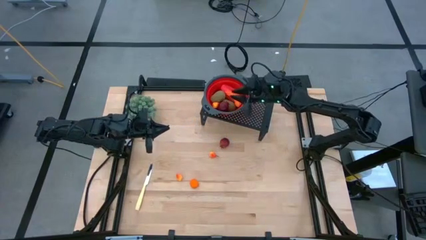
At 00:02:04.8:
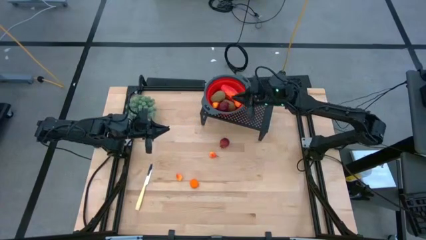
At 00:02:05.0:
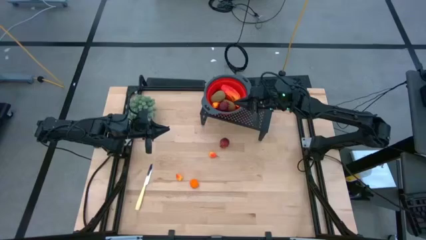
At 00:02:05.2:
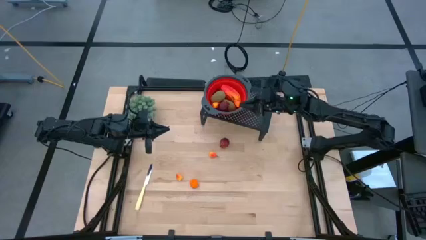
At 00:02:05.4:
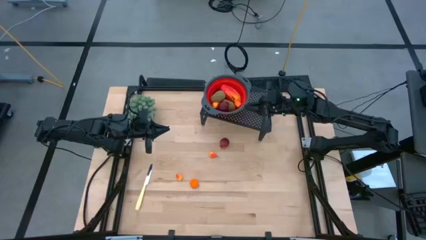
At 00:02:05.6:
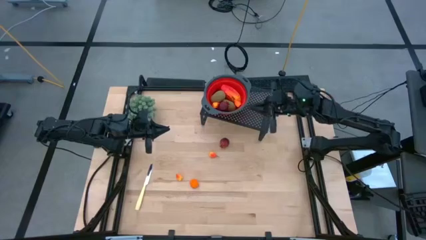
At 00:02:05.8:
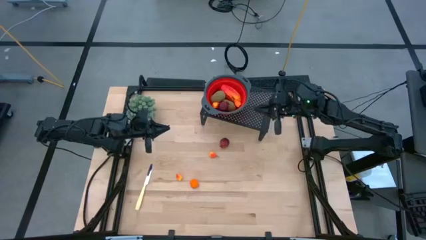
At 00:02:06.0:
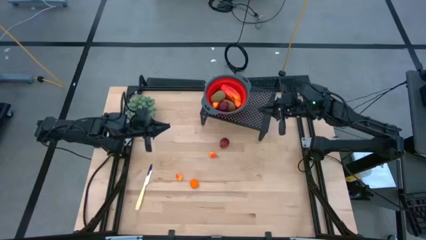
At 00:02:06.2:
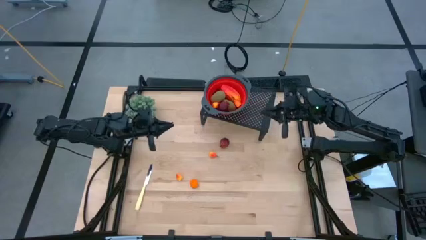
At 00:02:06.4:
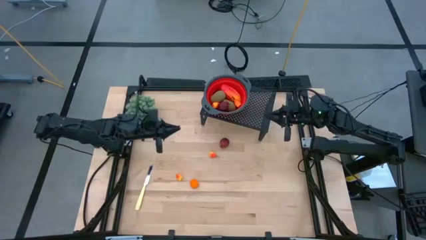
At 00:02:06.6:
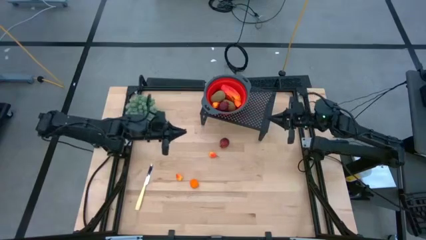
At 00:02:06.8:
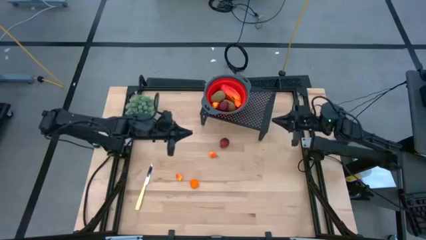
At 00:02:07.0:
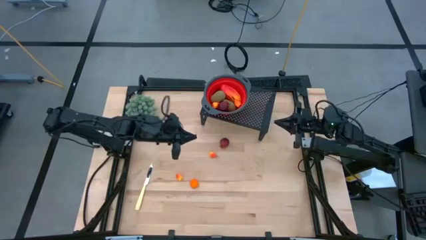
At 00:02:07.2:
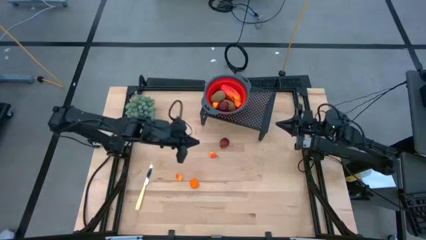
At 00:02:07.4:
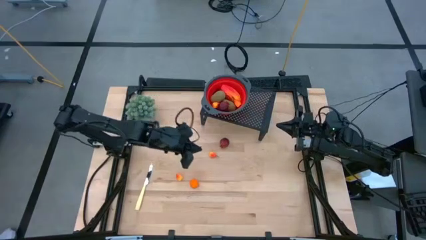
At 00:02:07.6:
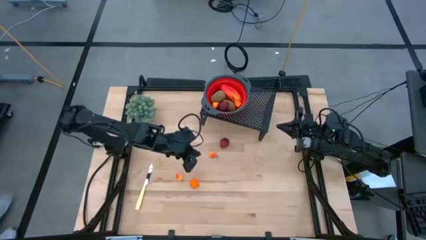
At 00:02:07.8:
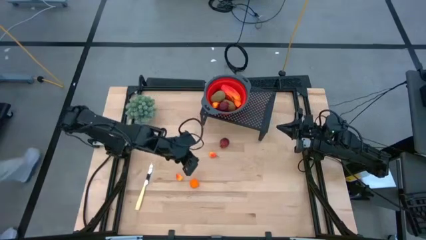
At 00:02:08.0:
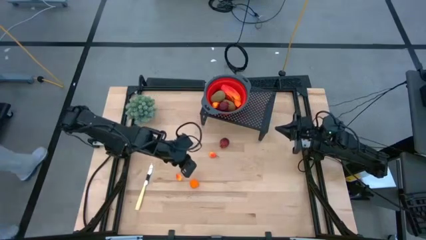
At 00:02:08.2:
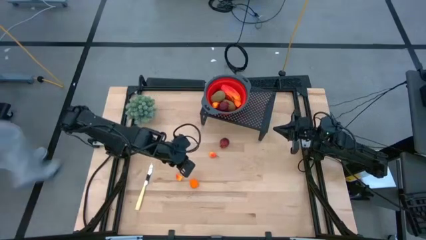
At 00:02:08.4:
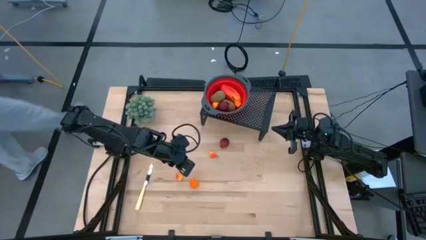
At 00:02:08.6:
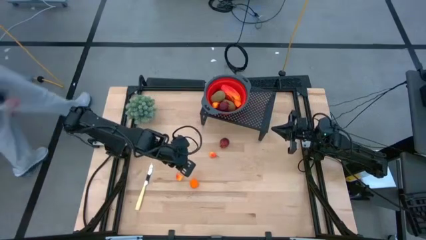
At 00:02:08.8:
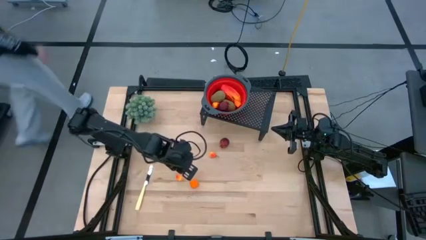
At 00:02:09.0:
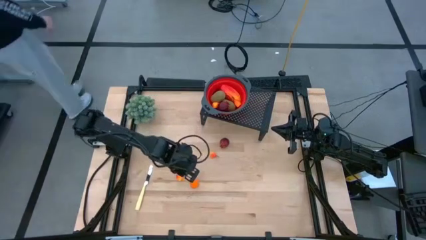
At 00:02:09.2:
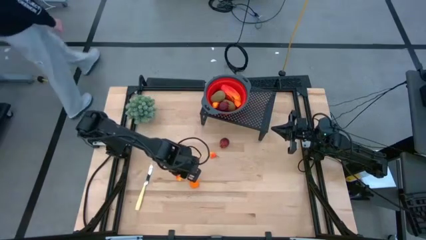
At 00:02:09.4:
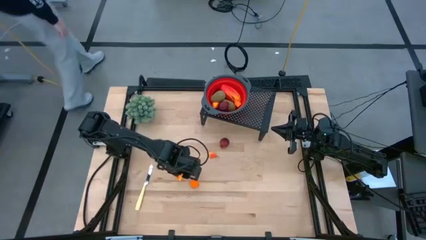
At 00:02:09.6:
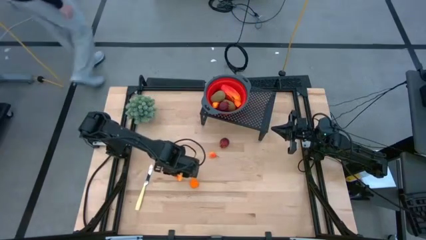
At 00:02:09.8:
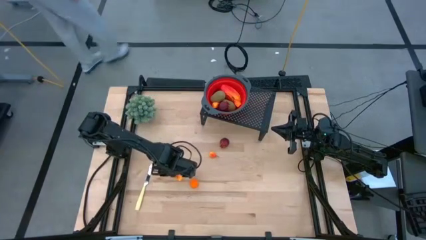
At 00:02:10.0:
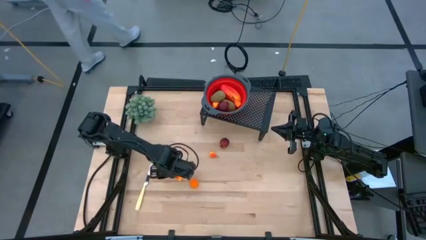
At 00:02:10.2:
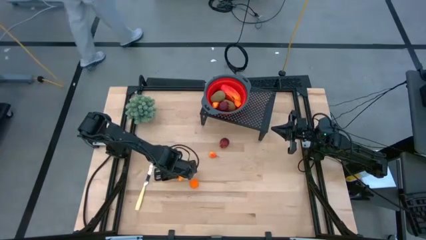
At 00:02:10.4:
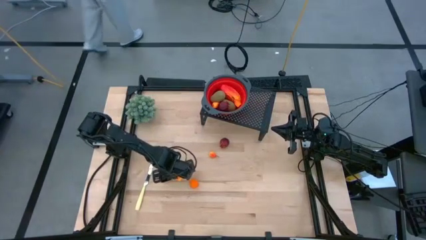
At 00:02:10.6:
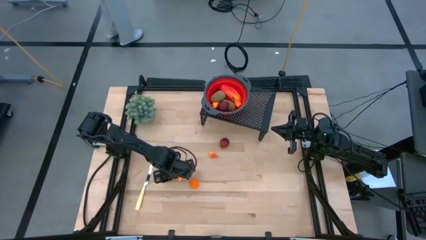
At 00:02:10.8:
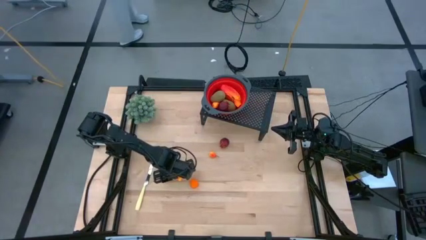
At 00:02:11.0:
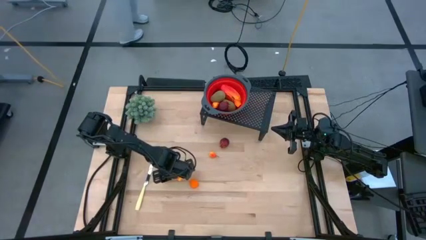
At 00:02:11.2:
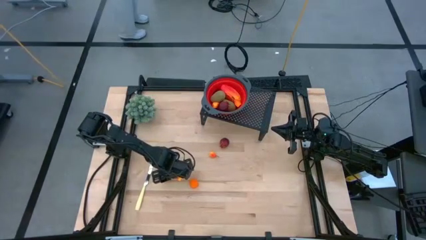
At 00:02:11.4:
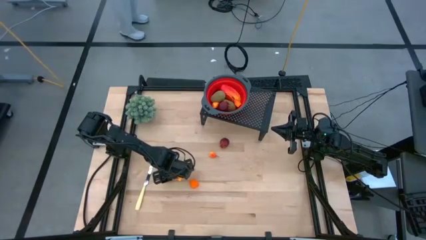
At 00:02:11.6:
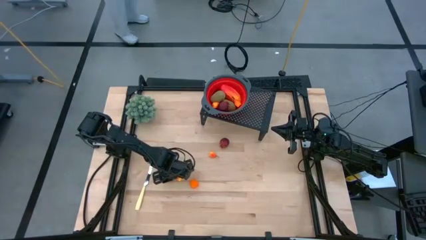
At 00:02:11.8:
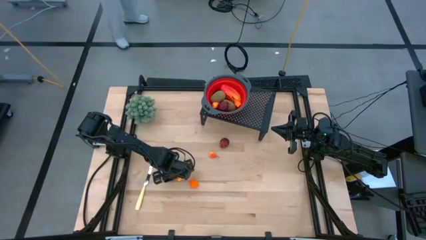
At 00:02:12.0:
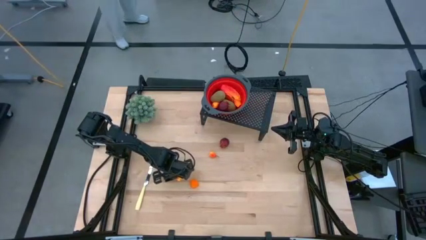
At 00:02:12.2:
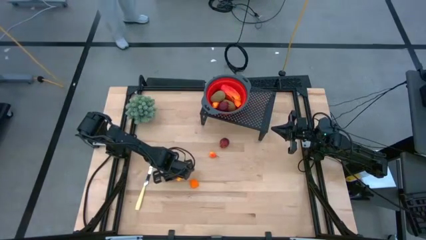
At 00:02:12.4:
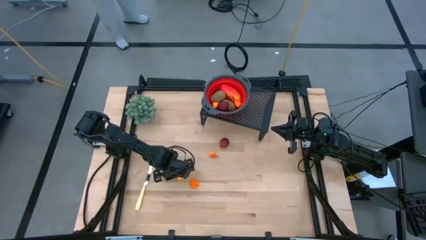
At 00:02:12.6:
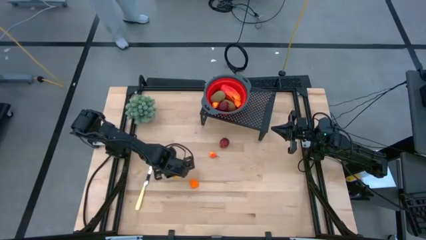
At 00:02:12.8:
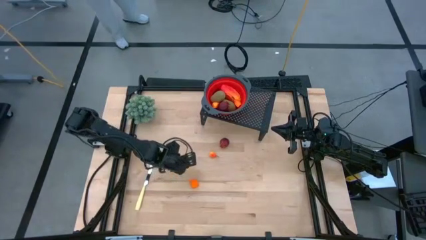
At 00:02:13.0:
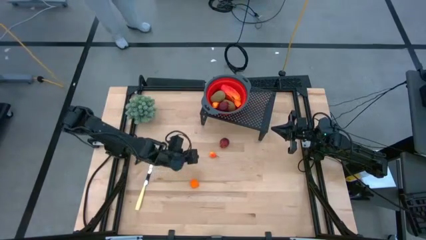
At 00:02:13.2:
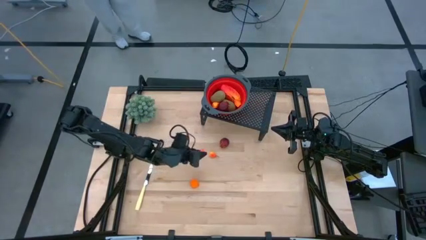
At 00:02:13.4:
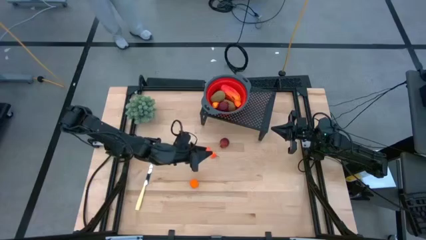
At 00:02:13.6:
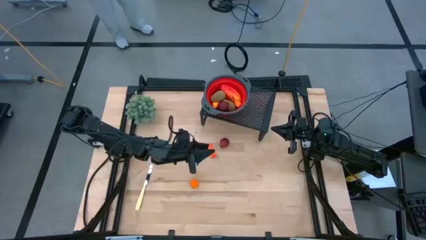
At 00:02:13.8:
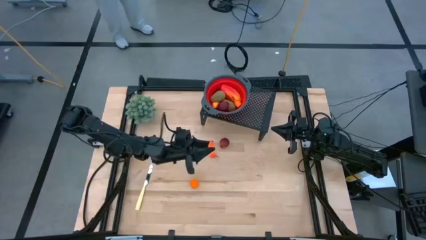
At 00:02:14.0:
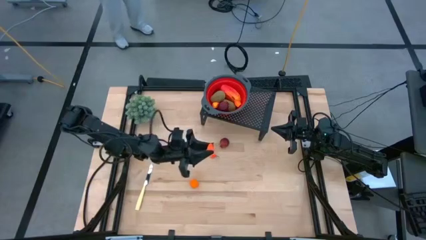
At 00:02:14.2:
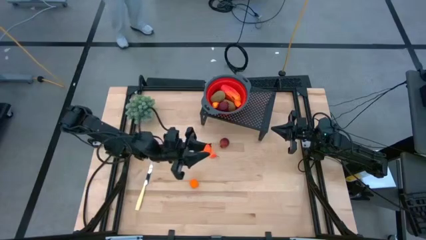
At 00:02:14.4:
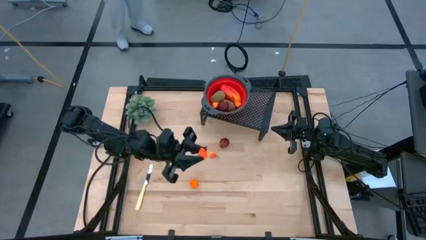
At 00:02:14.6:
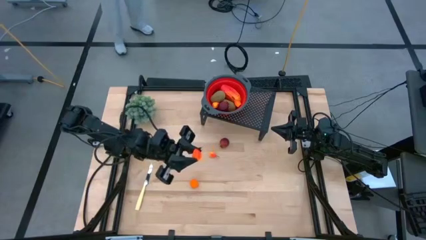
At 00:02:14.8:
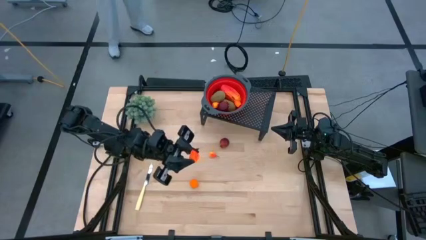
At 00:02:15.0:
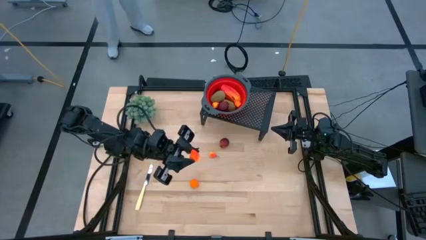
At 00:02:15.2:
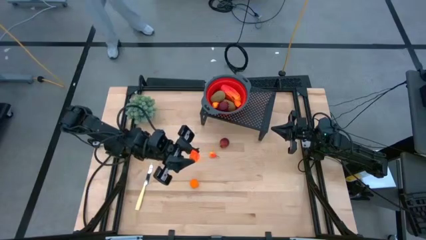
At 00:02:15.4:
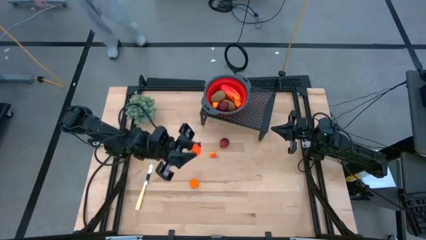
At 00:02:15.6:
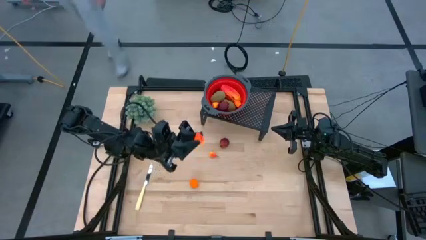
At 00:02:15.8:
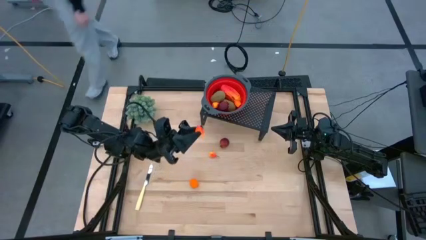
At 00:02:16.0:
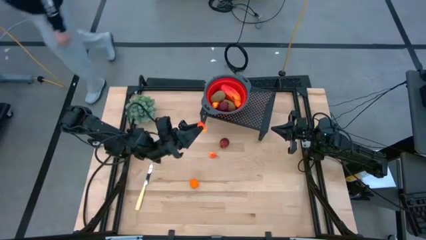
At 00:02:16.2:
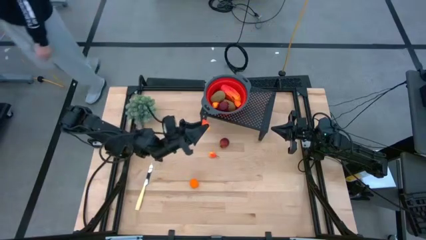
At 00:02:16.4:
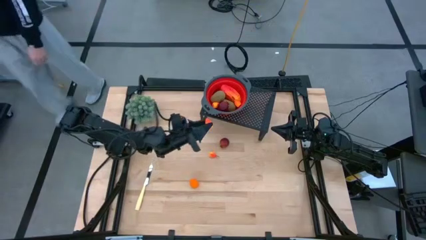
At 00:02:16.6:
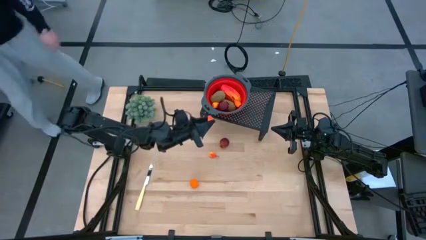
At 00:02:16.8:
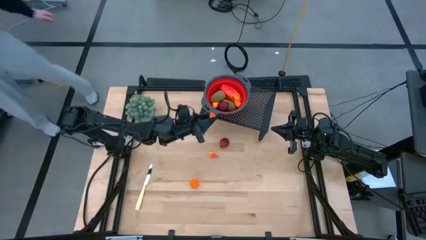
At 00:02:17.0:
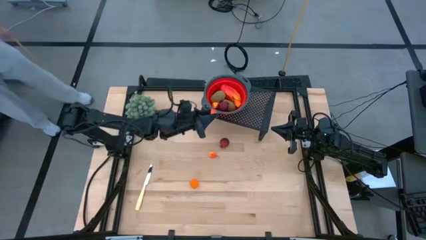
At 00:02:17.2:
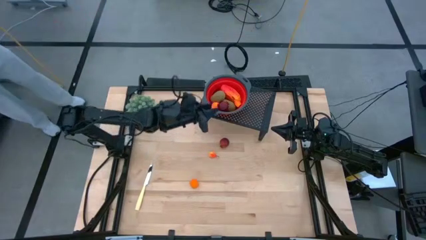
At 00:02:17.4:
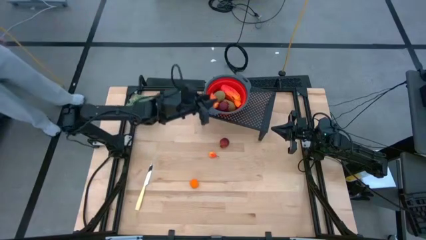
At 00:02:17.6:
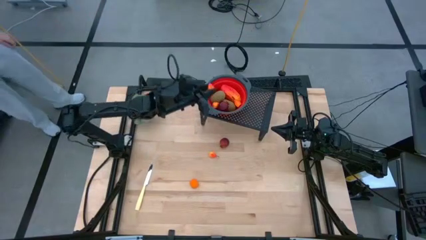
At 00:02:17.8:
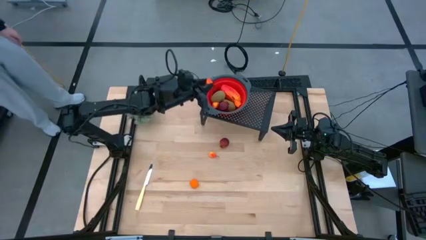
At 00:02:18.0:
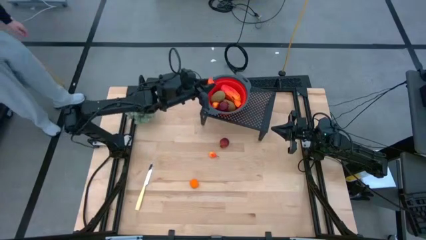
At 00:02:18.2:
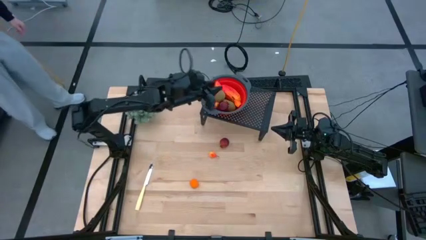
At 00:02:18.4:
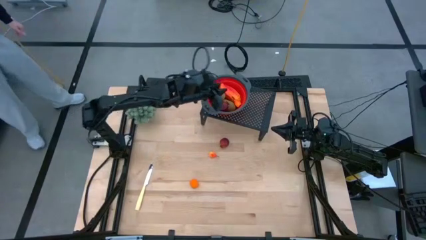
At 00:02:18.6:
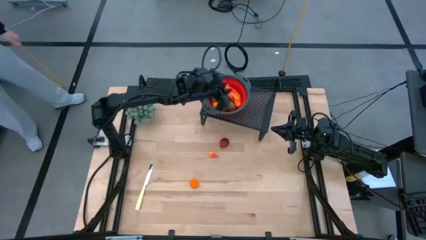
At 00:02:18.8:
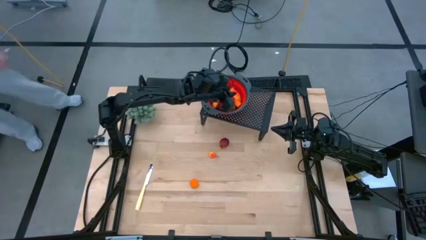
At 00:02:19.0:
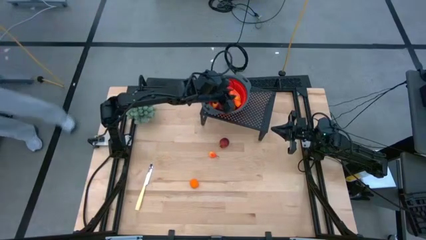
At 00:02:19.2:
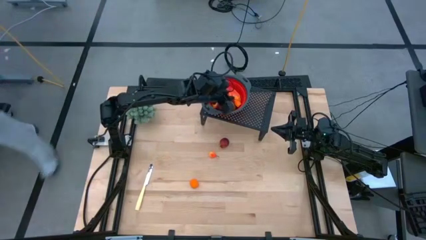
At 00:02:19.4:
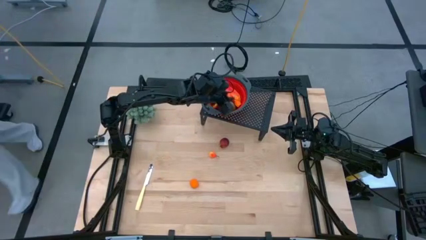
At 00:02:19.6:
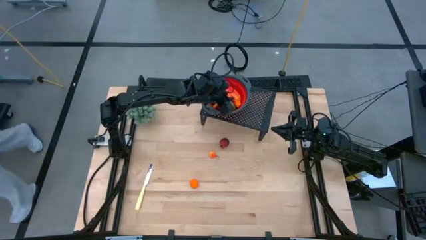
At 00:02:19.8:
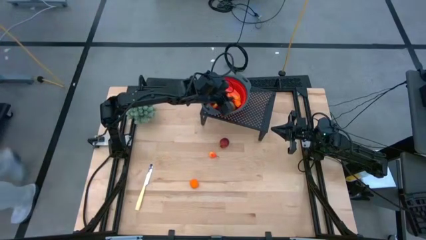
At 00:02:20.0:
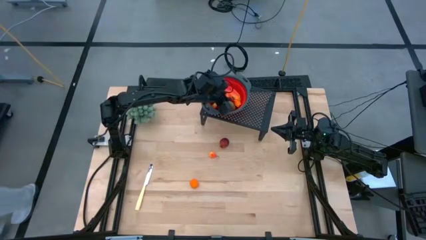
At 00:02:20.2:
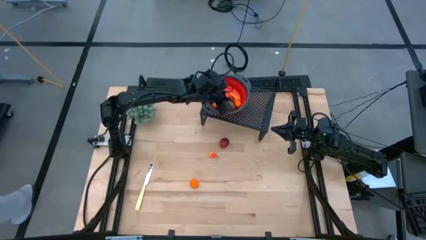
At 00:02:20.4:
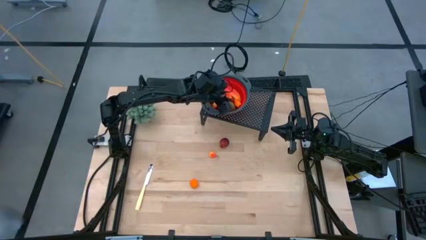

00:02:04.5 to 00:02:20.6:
Task: Pick & Place Fruit
Put the pear into the red strainer bowl on the shelf
